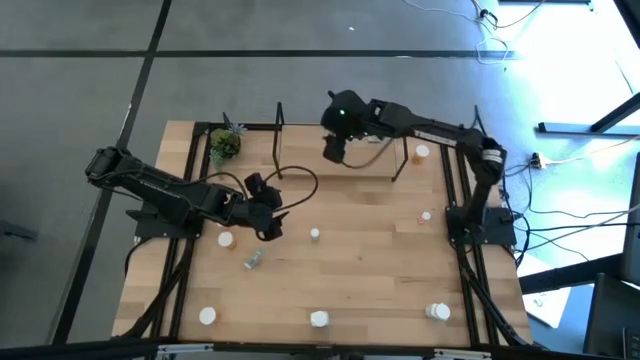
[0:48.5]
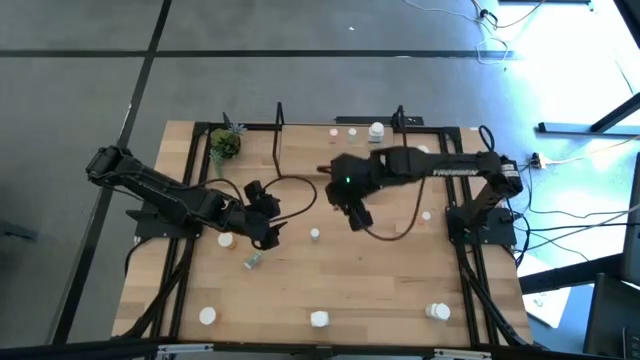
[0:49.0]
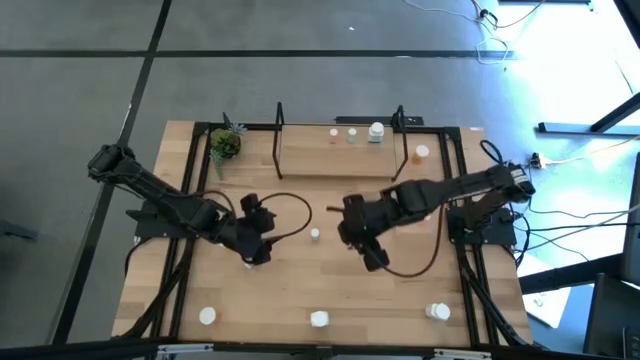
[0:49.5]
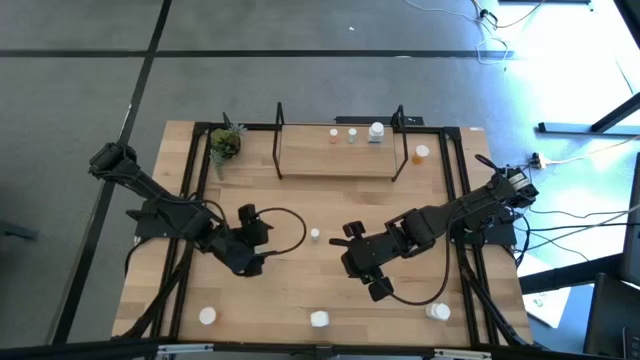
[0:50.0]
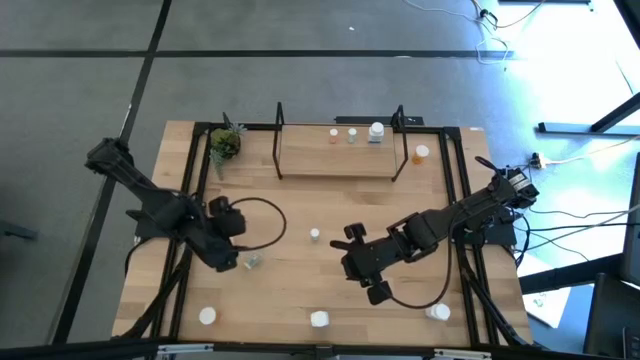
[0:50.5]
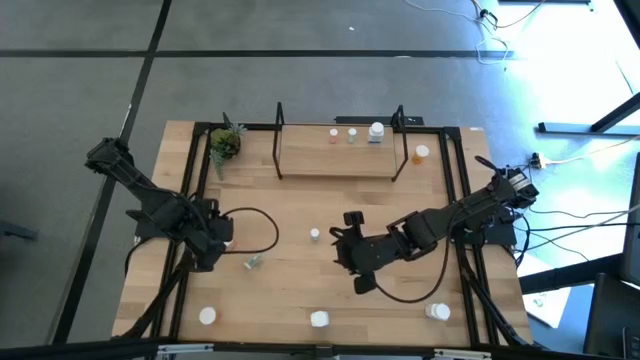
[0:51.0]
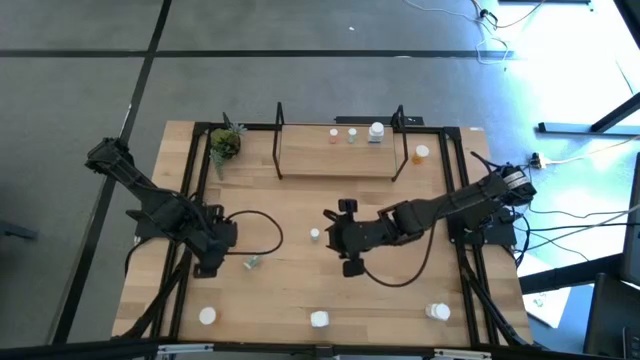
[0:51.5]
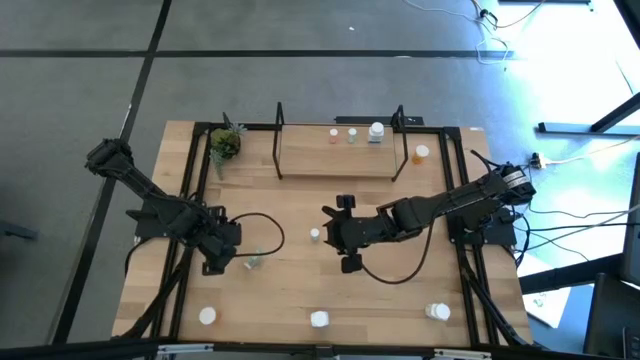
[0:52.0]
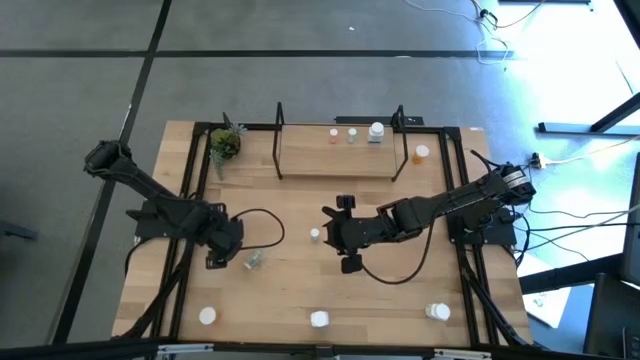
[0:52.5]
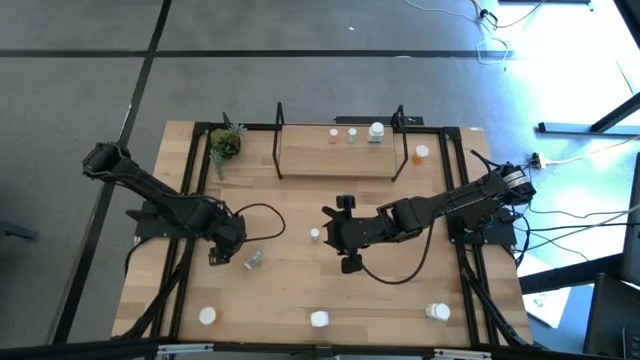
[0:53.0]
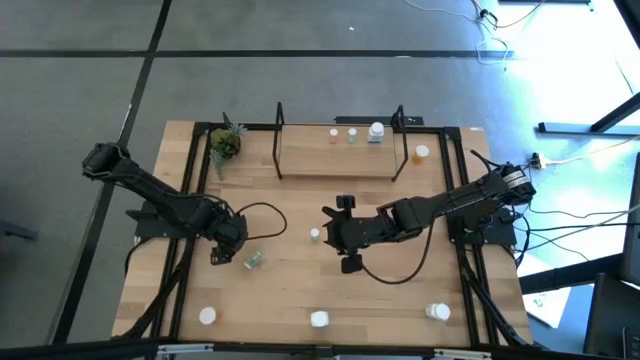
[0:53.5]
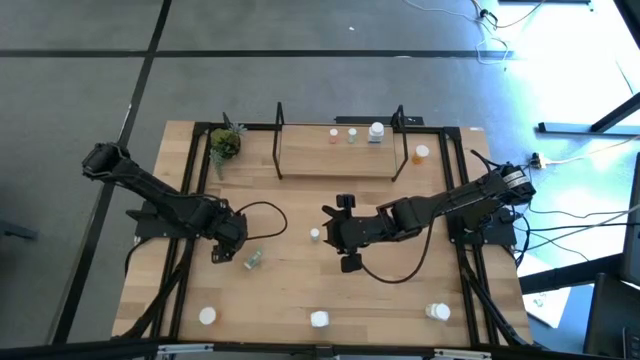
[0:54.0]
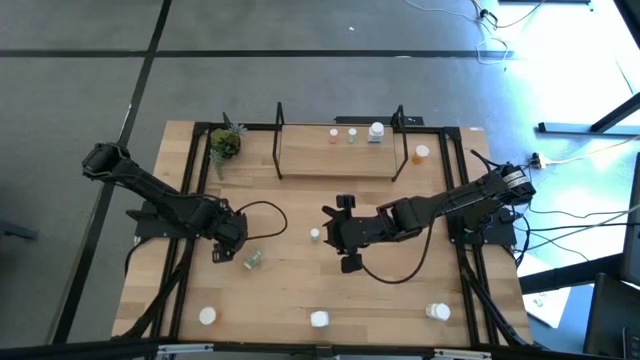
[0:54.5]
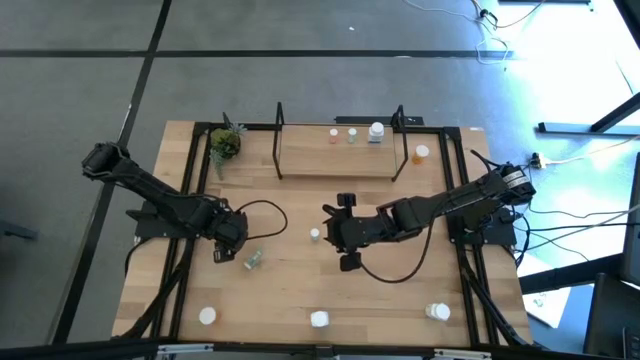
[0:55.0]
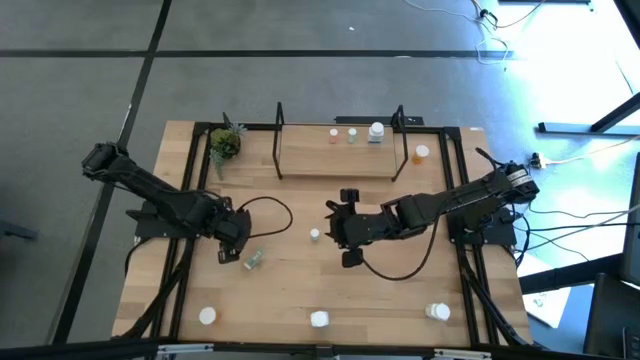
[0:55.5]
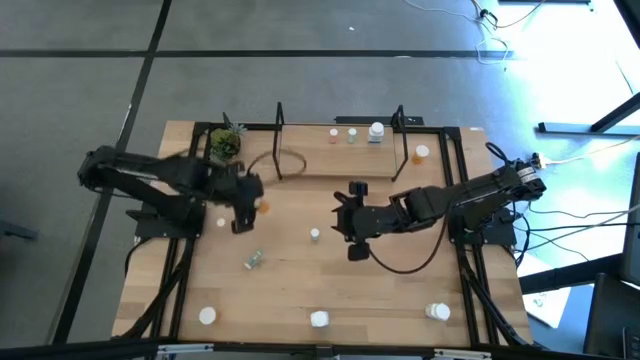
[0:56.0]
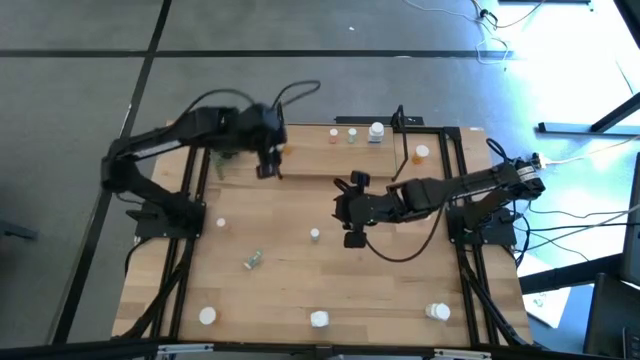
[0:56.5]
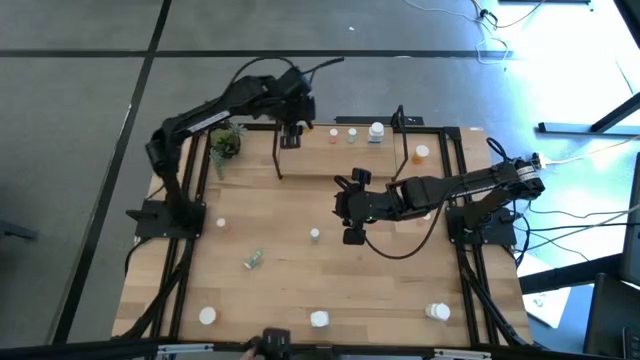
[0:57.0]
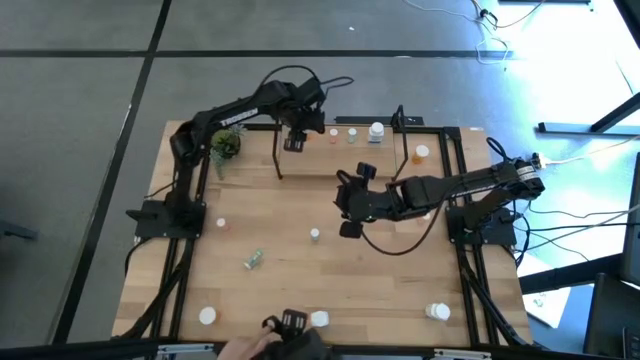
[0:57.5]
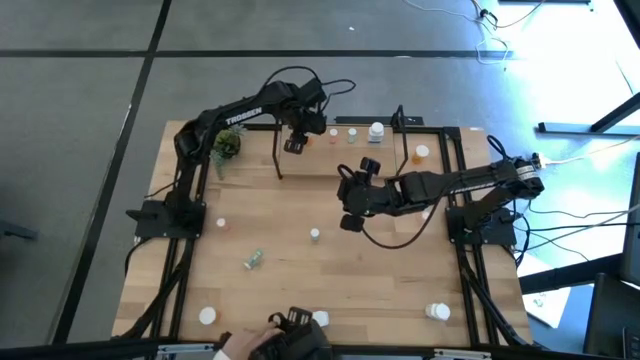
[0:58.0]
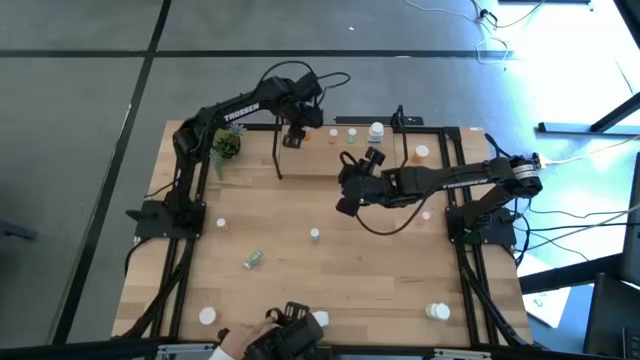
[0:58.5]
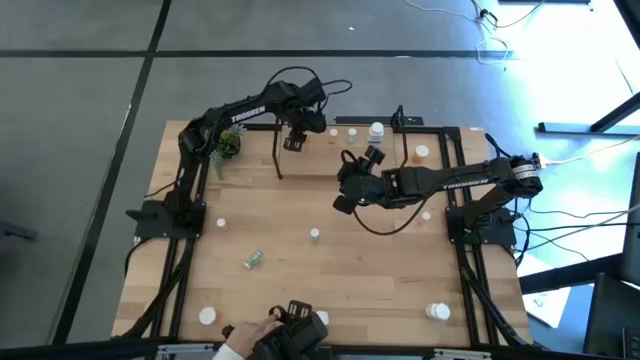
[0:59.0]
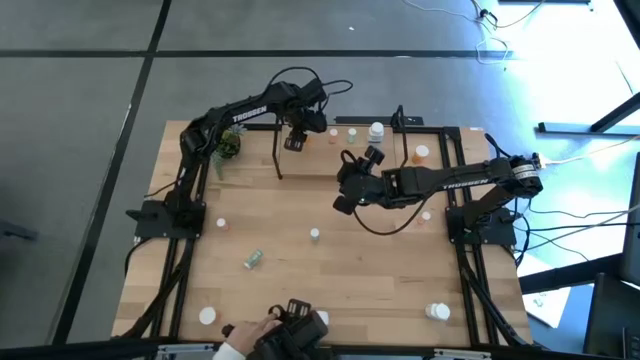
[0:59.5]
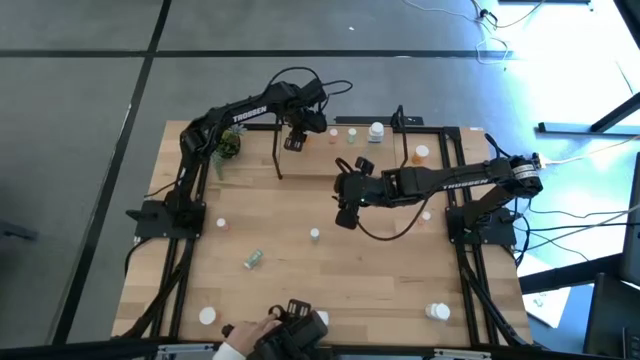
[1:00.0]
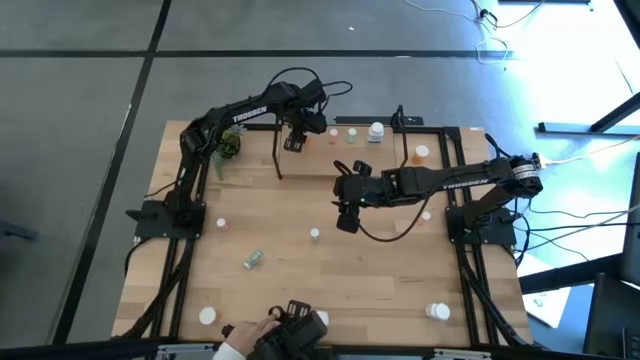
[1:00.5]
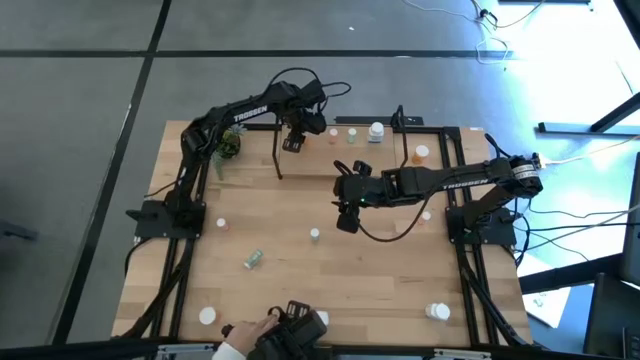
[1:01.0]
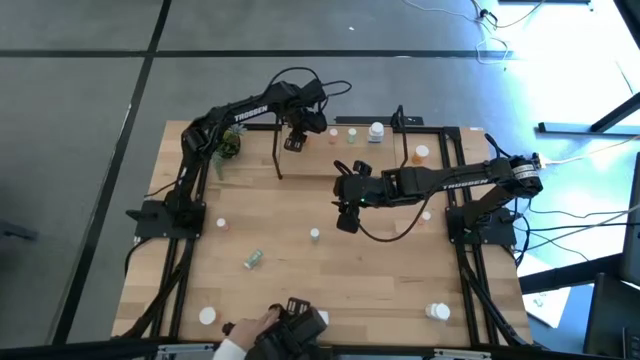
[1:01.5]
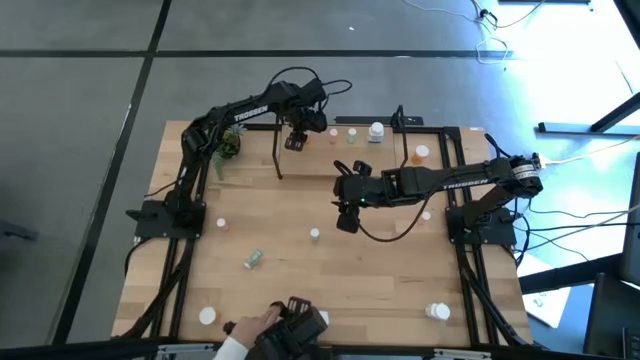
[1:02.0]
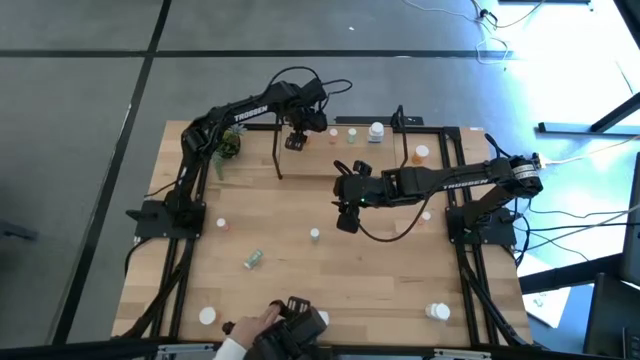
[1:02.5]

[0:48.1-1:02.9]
Task: Pick and place medicine bottles onto shelf by color
Put the bottom right orange pill bottle on the shelf

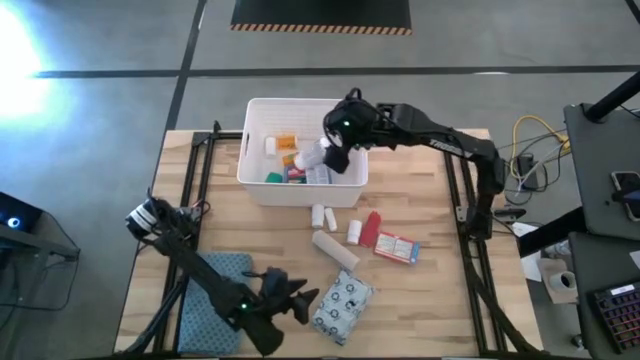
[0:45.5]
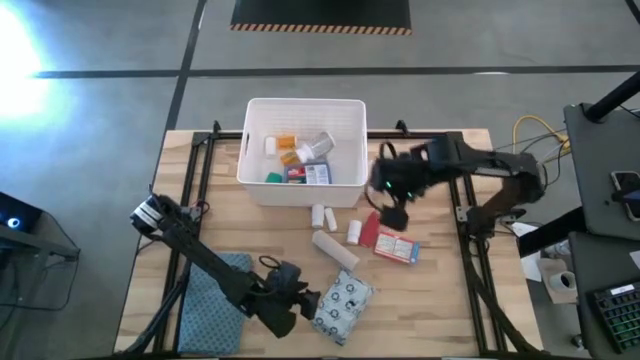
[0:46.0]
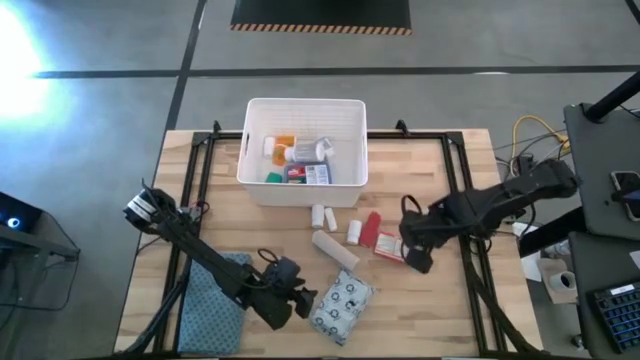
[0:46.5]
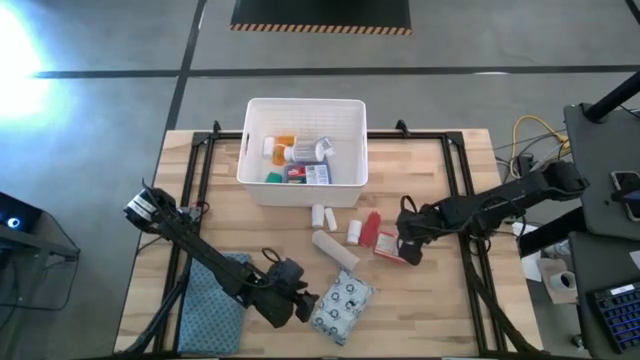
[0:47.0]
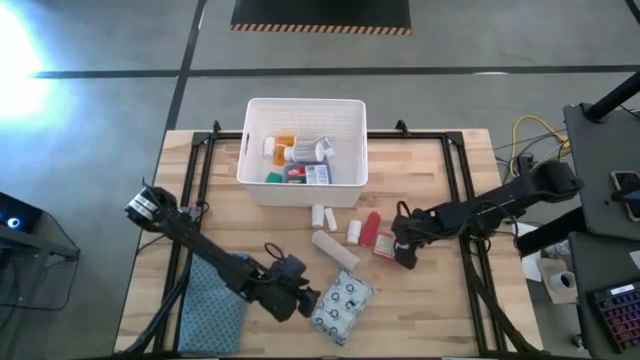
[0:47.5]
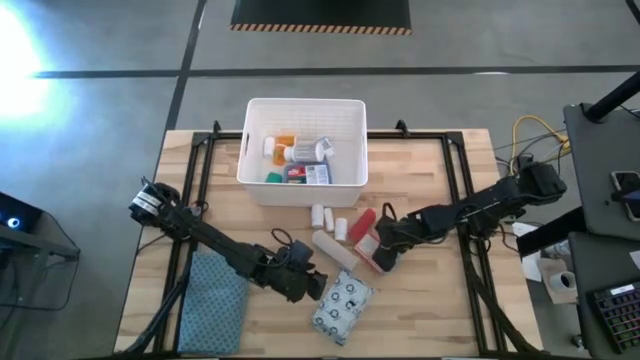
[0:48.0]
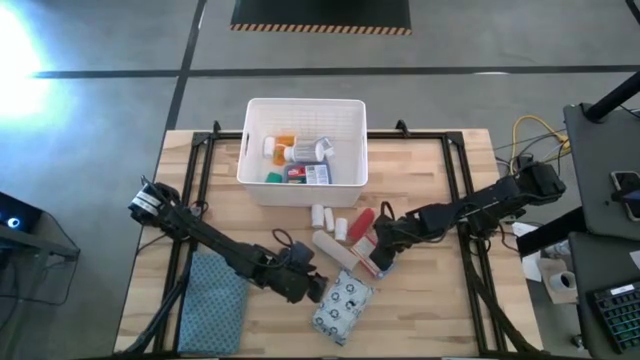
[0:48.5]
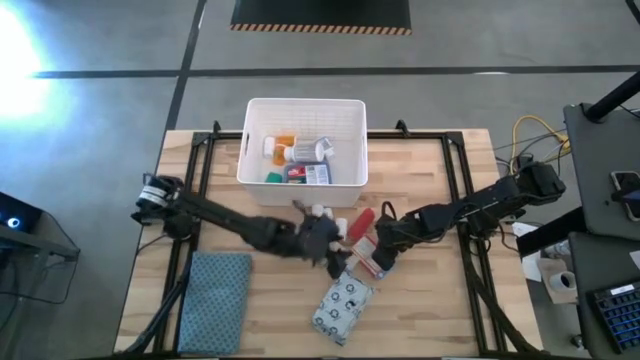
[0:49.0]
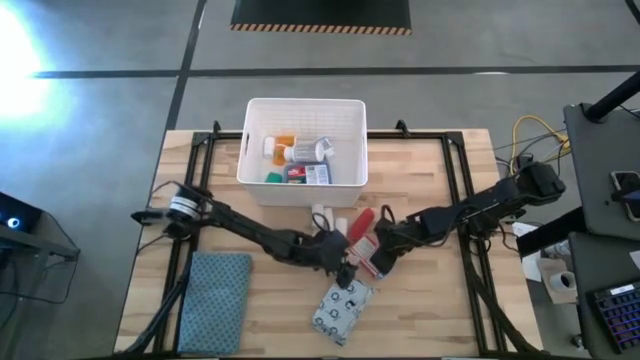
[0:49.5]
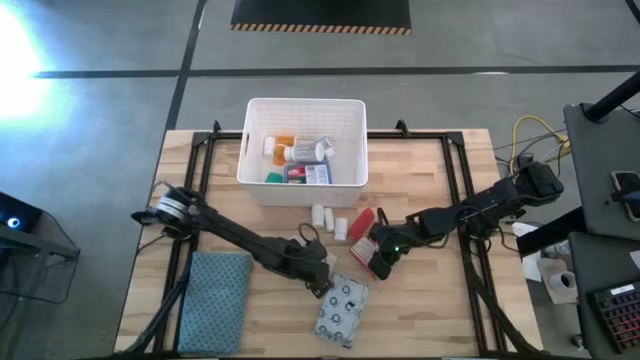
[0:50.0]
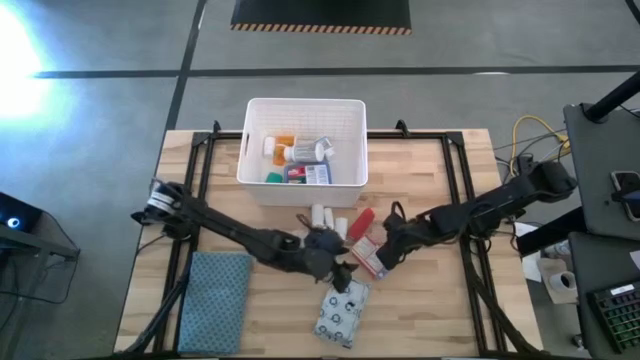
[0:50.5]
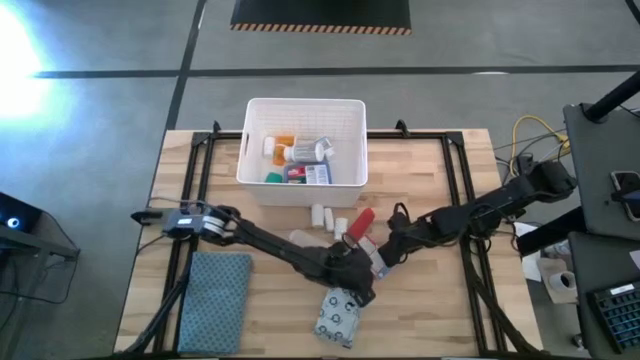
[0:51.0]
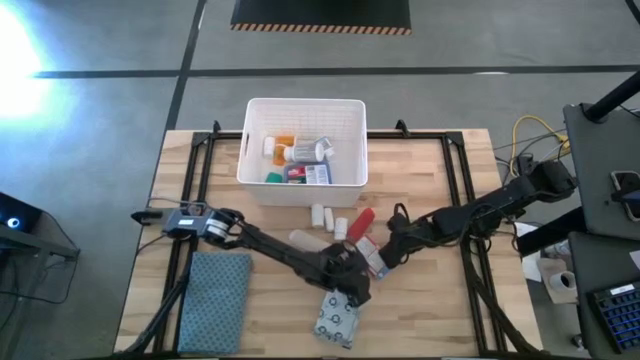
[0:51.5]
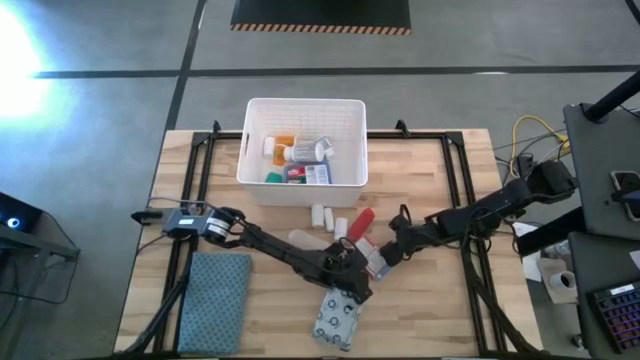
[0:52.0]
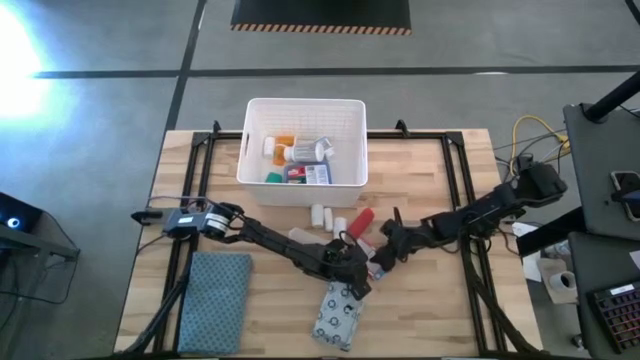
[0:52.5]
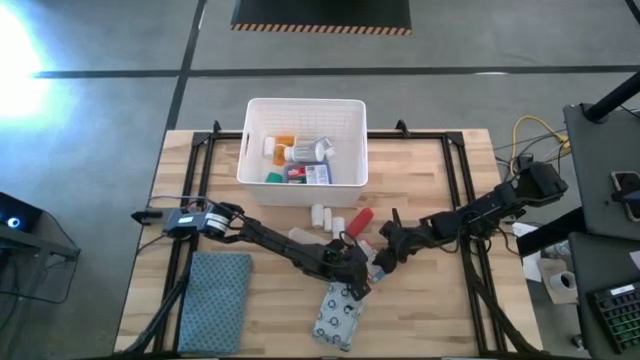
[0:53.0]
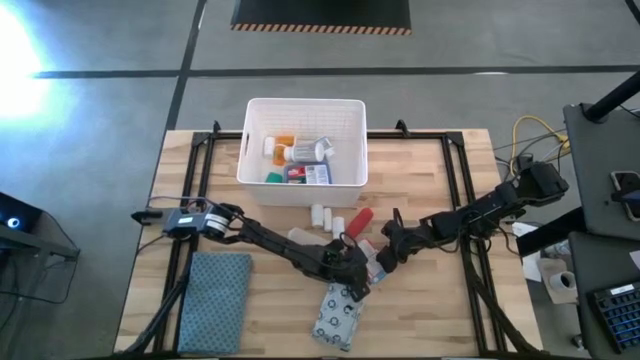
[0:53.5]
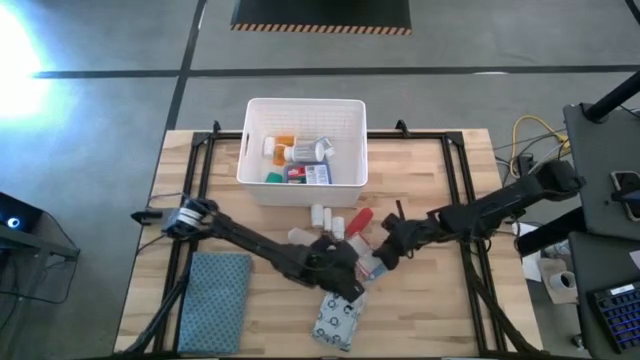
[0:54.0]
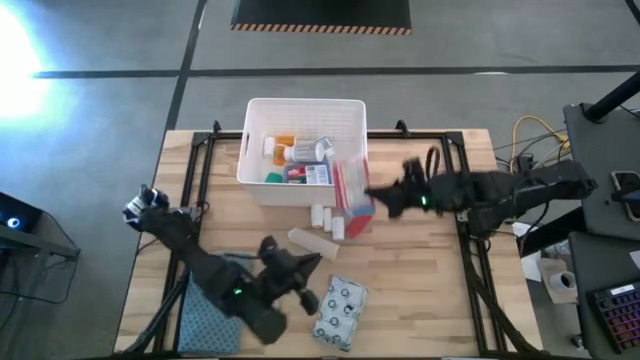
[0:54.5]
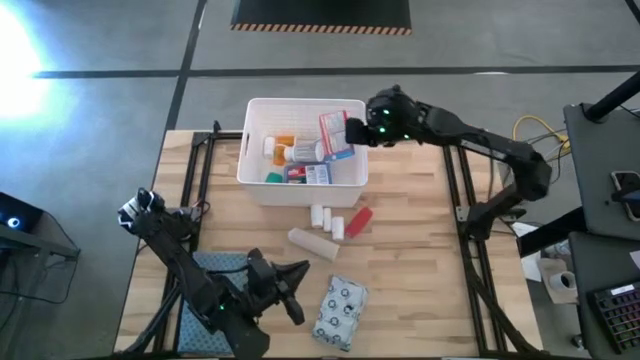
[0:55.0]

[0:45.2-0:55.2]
Task: Pick & place medical supplies in basket/bin
Put the band aid box into the white bin
